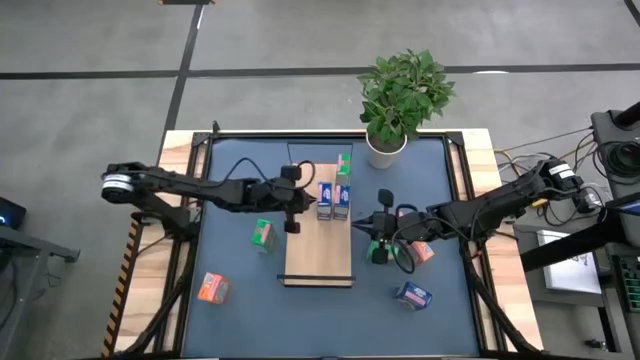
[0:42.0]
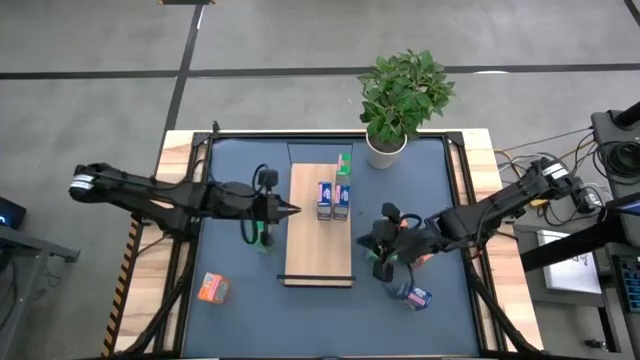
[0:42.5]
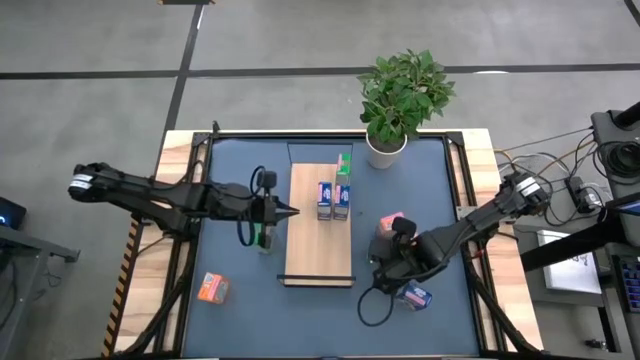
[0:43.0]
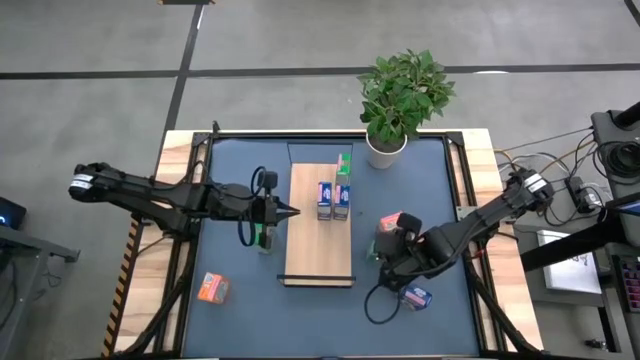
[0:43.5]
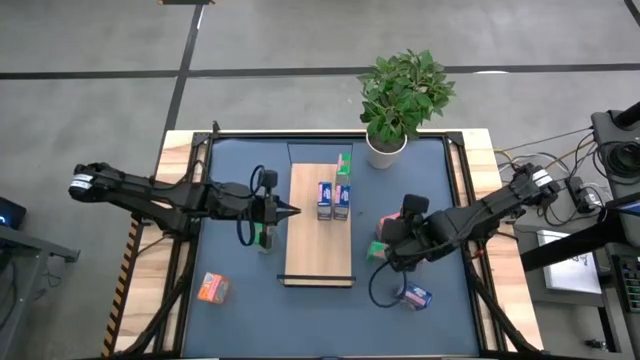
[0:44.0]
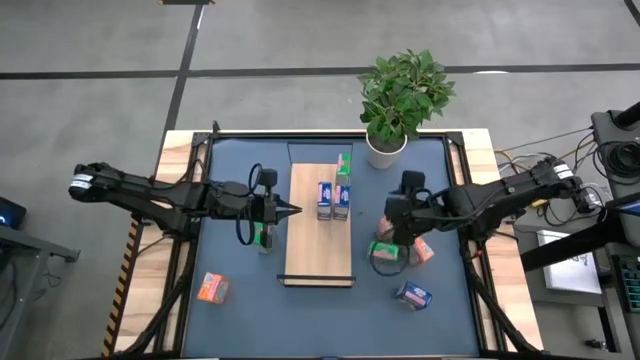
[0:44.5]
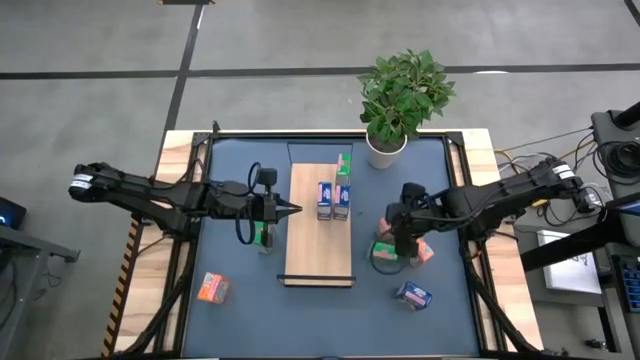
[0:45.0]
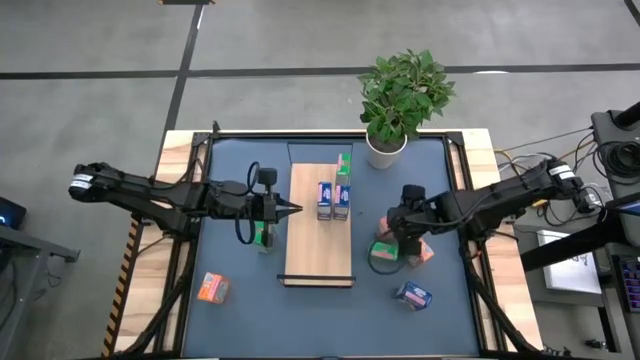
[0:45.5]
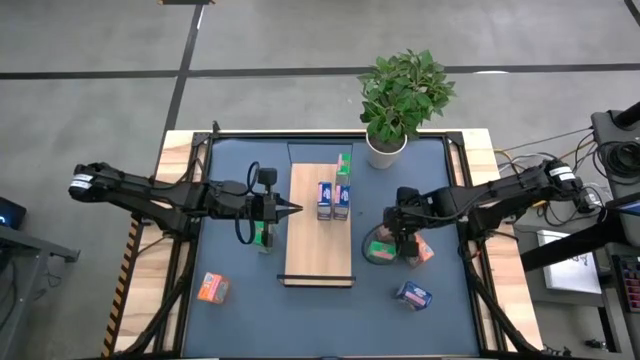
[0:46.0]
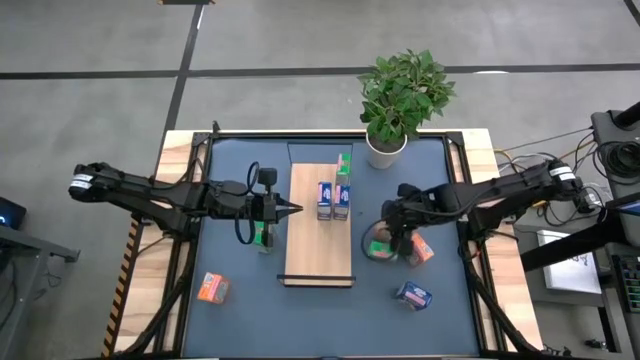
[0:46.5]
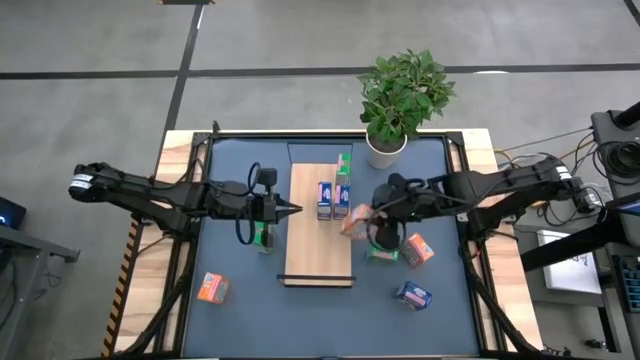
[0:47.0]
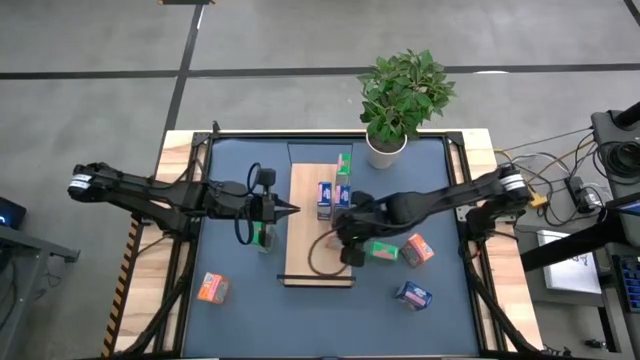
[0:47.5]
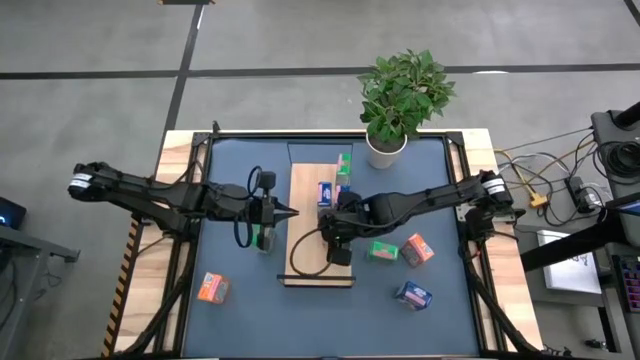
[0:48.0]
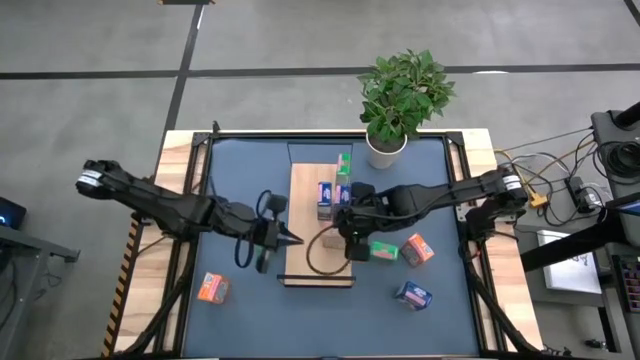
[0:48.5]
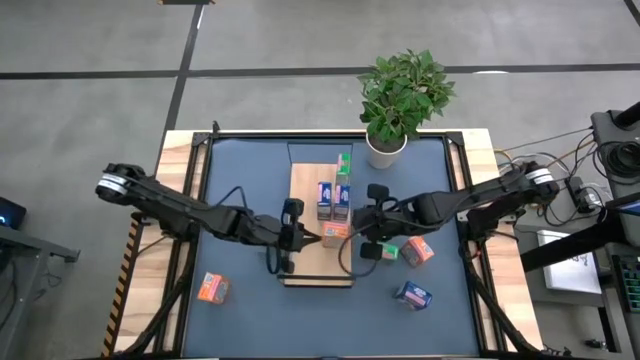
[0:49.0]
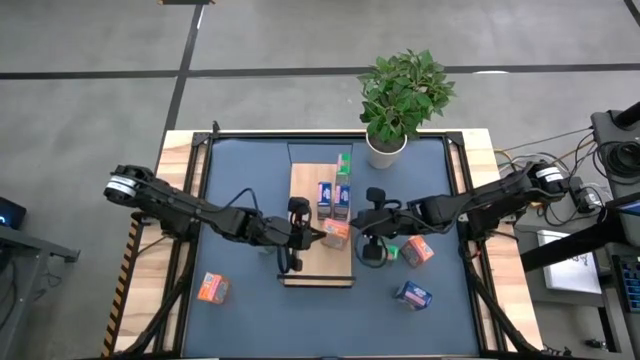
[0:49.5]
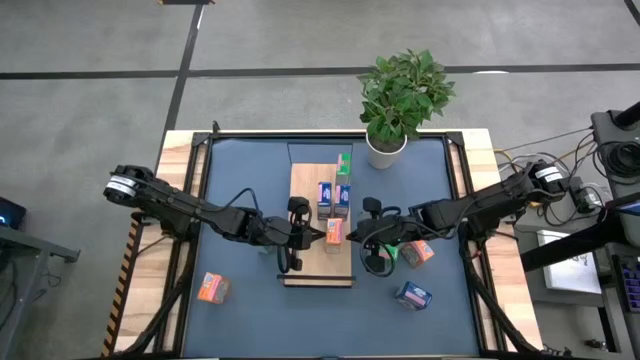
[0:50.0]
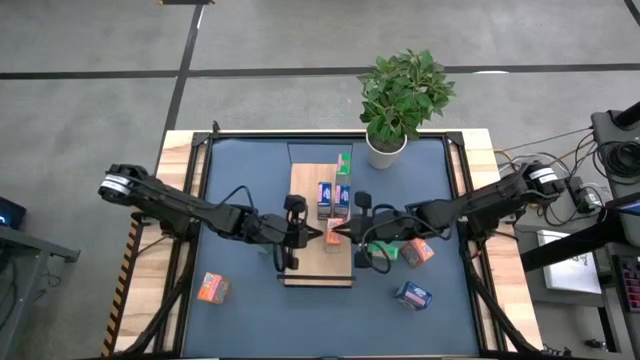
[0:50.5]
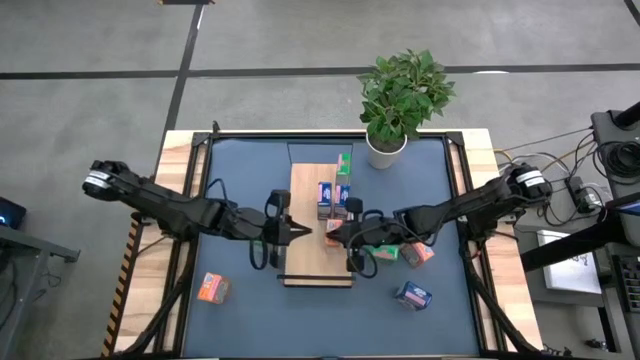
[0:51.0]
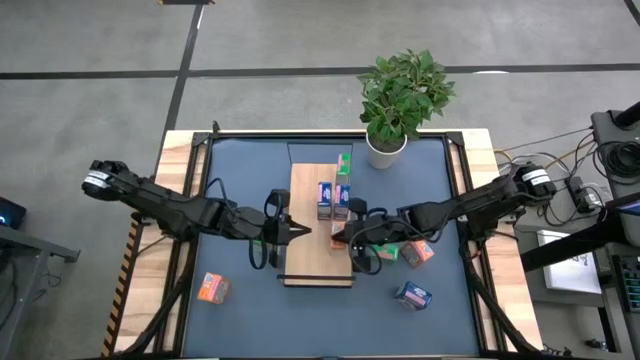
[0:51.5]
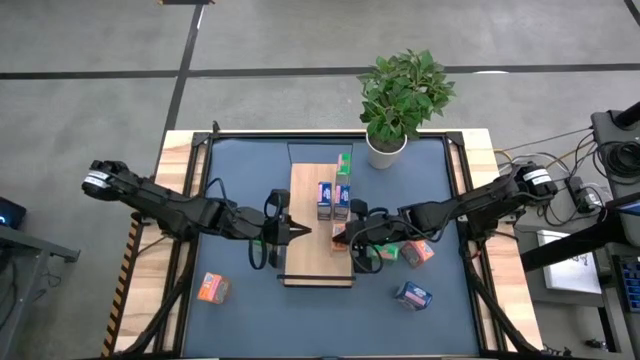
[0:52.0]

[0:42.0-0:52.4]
Task: Stack cereal on shelf
Put the top left orange cereal box on the shelf

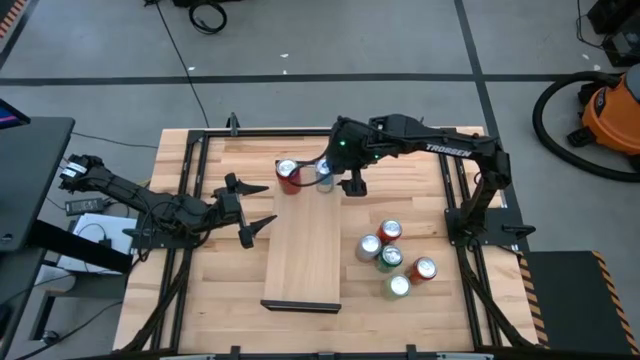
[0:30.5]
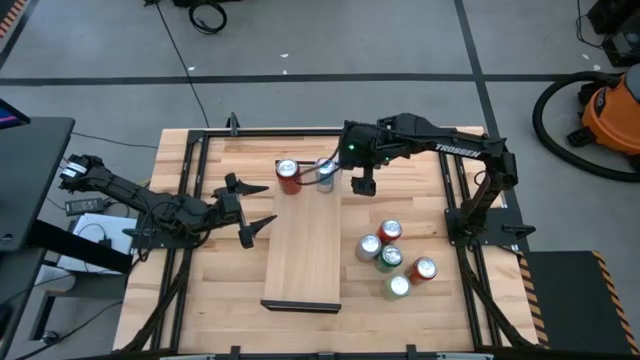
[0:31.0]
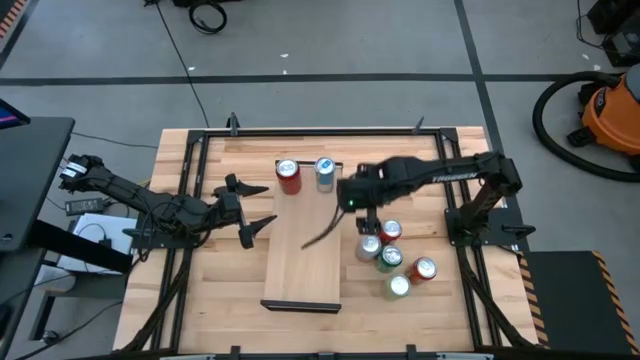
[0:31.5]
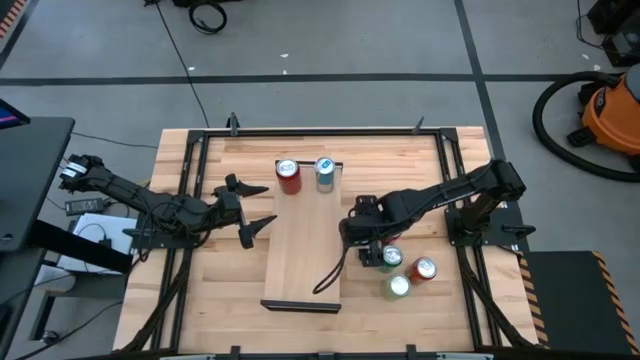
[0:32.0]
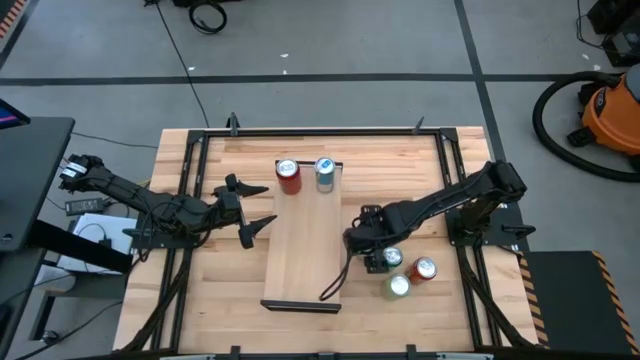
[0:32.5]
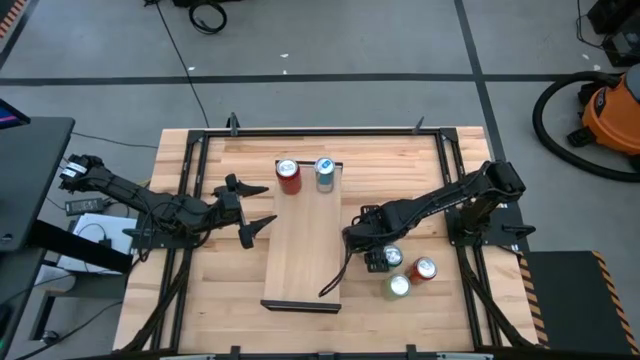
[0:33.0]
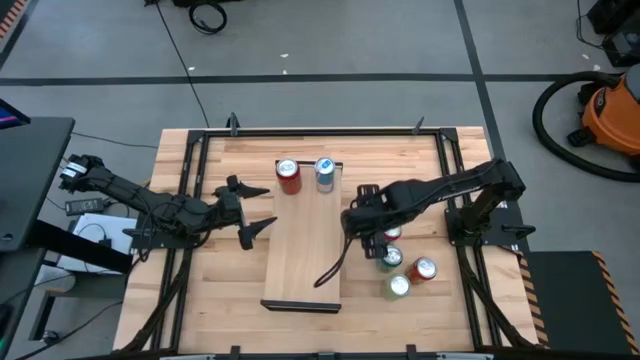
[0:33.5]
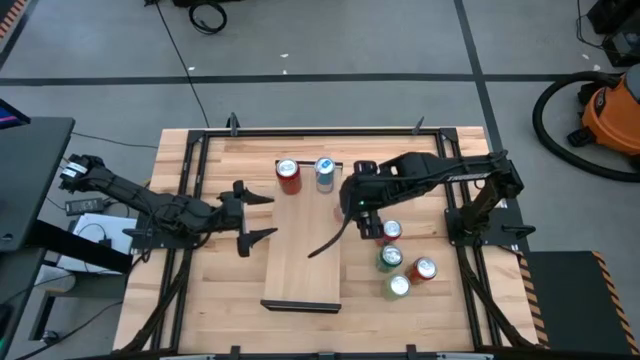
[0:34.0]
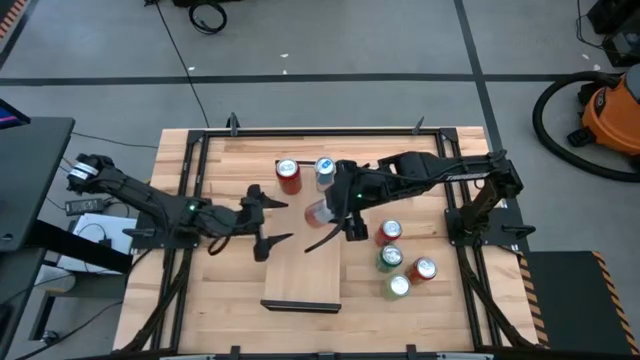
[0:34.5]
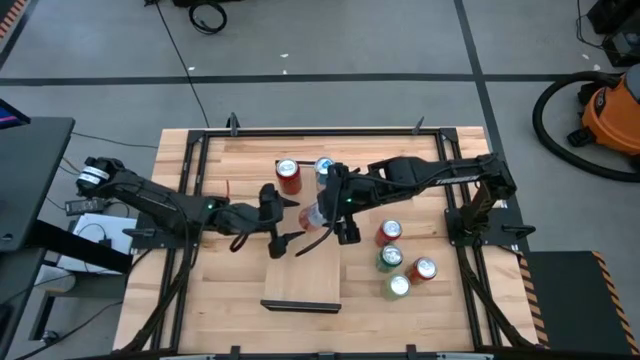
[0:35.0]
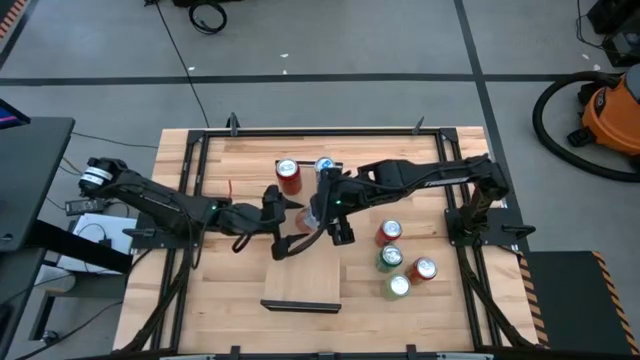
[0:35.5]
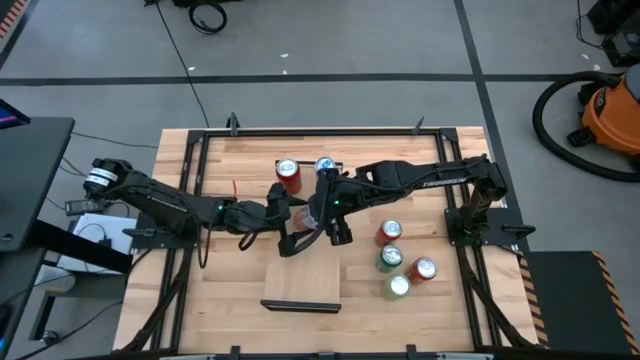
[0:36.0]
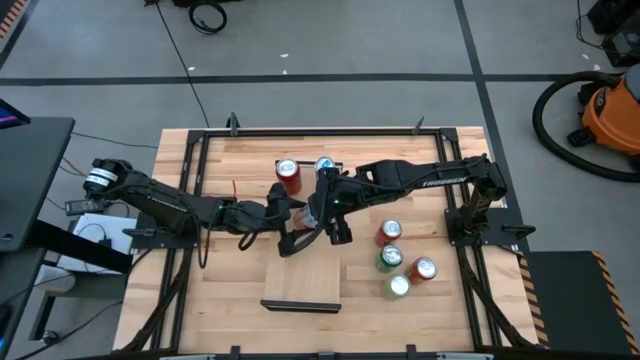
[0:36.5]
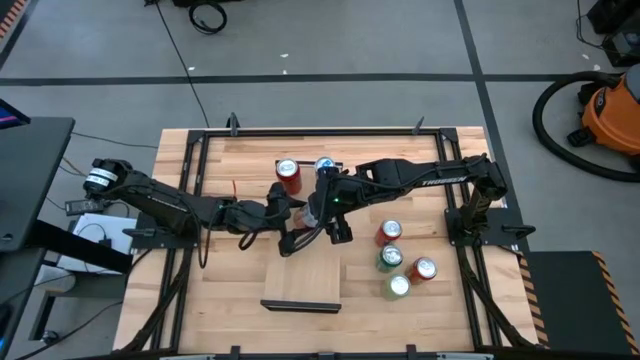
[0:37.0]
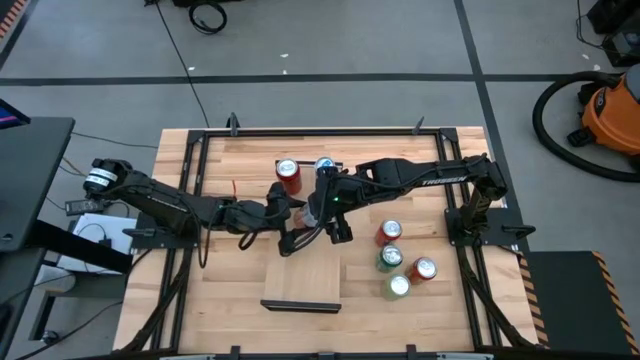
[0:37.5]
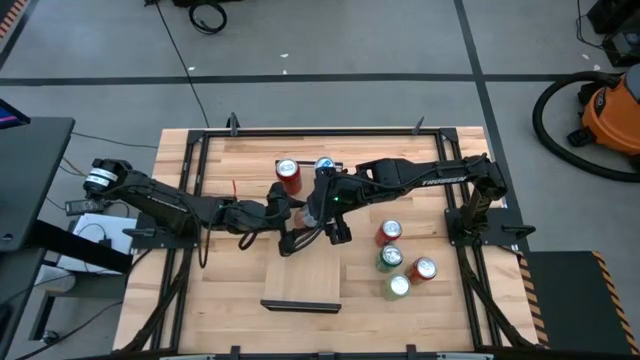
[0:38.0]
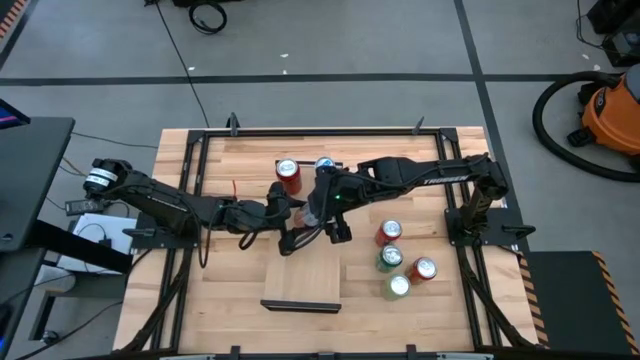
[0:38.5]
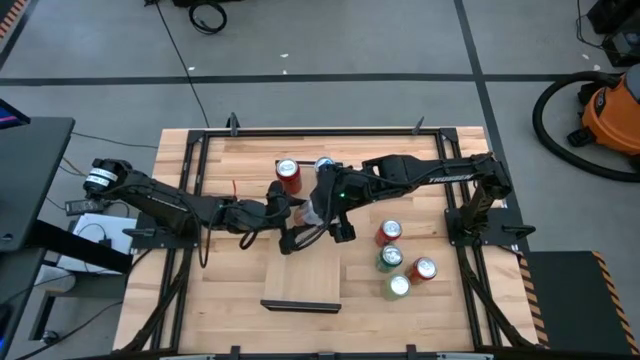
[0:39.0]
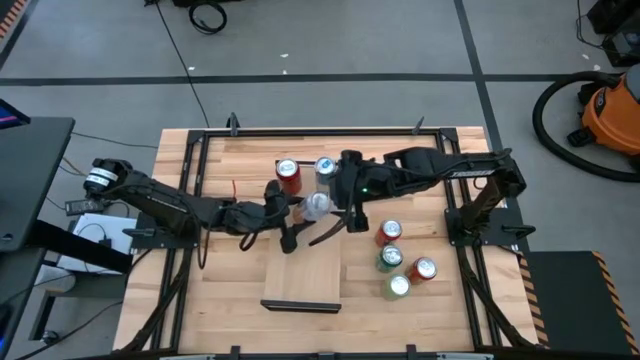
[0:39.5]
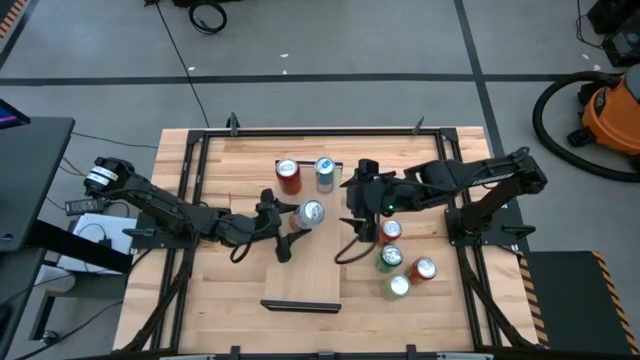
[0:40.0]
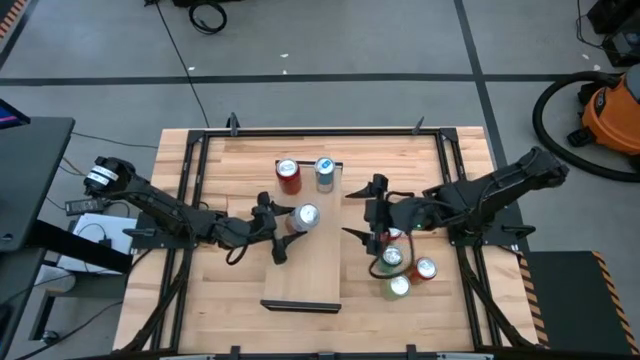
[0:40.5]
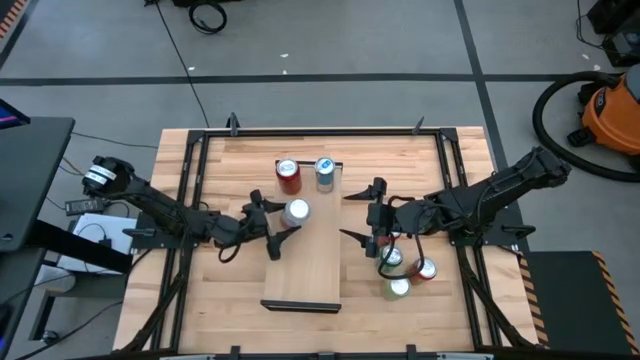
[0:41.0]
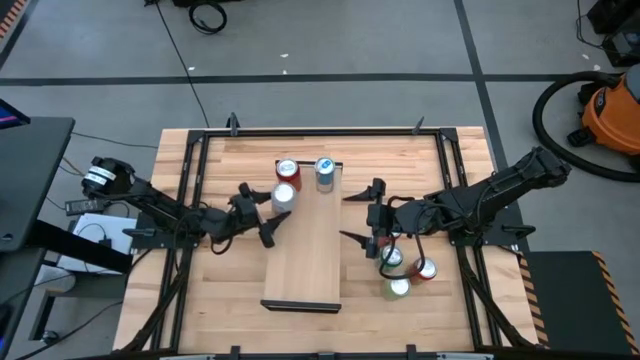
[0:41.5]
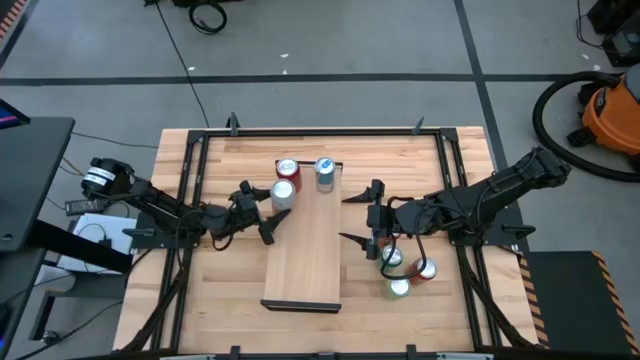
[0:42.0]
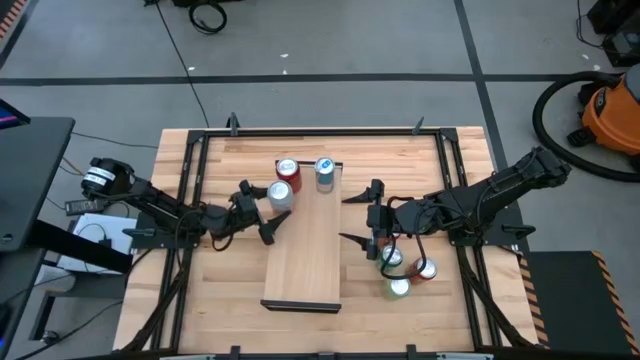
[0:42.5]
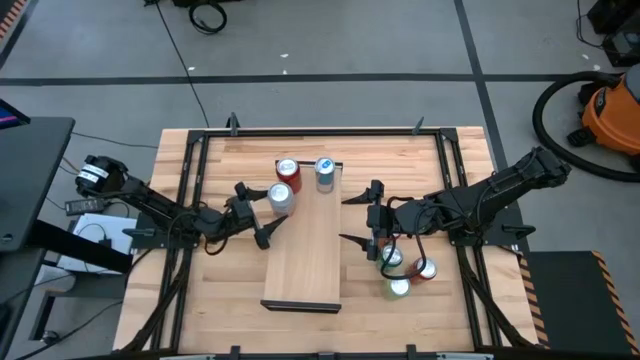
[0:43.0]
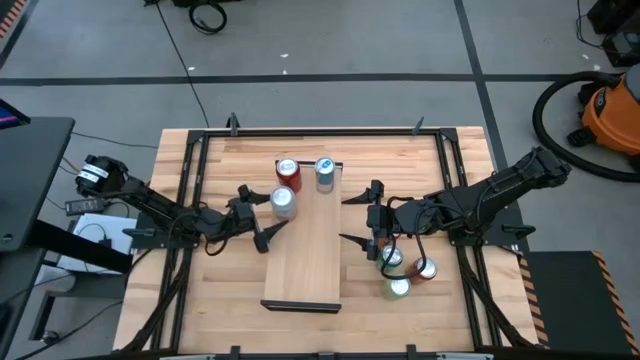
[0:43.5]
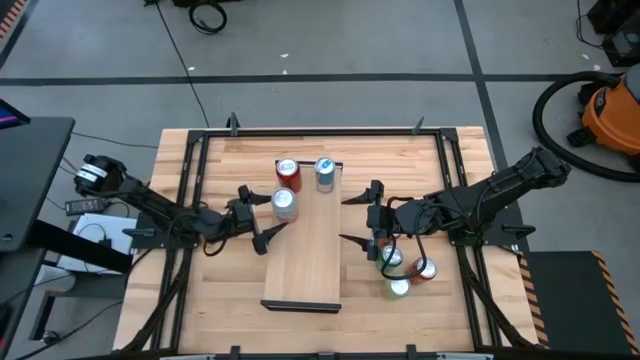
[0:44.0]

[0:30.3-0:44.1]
Task: Place canned beverage on shelf
Put the pink soda can on the shelf
